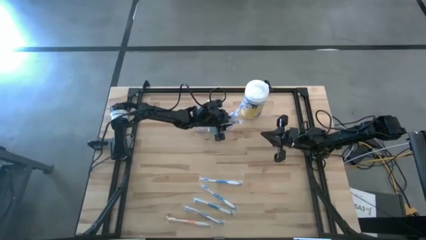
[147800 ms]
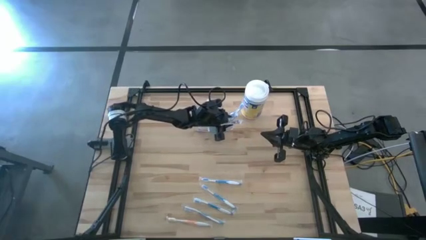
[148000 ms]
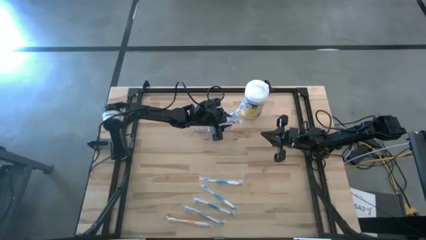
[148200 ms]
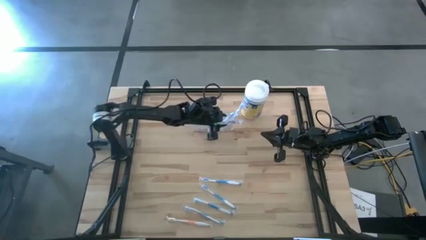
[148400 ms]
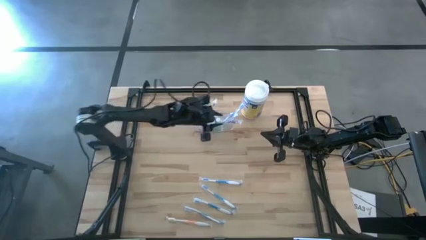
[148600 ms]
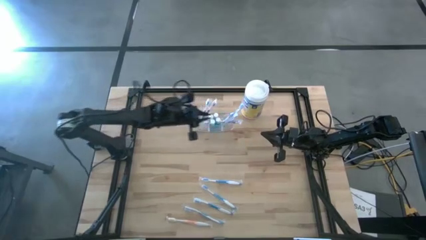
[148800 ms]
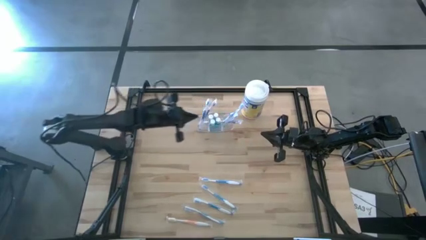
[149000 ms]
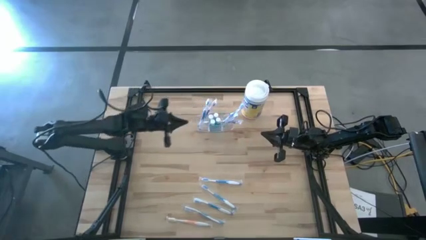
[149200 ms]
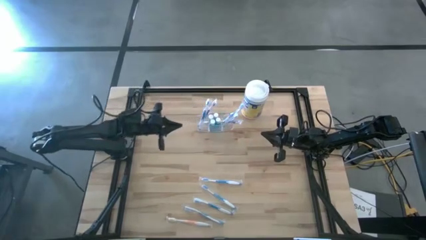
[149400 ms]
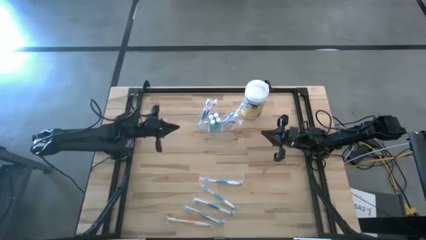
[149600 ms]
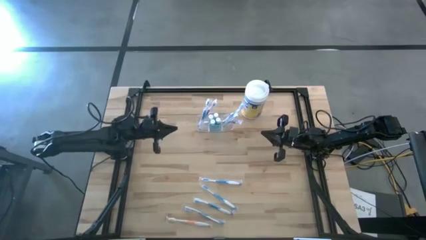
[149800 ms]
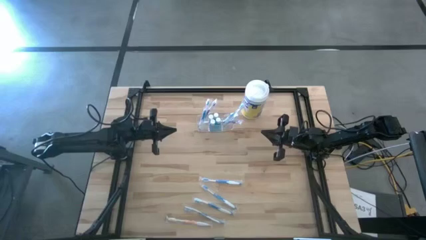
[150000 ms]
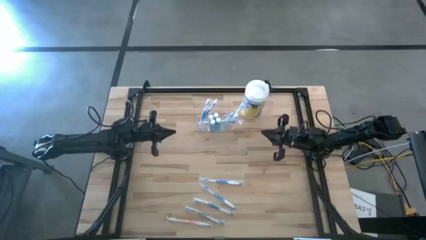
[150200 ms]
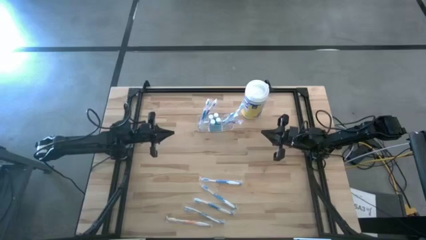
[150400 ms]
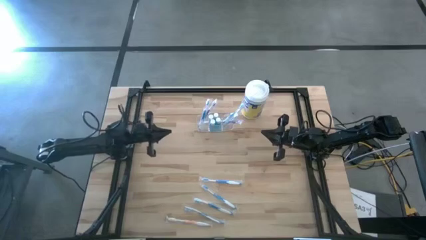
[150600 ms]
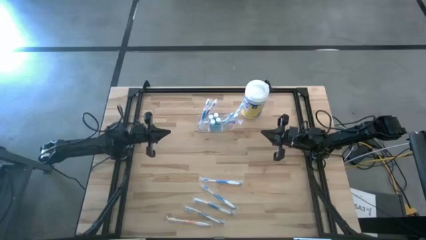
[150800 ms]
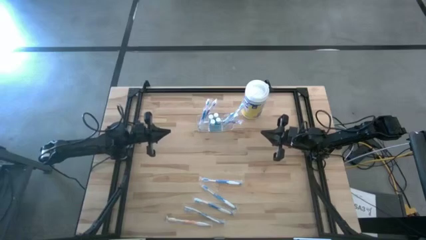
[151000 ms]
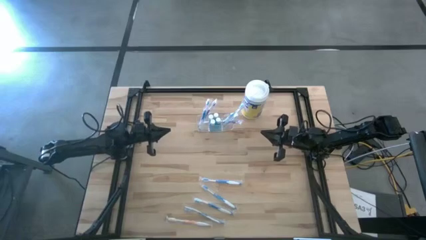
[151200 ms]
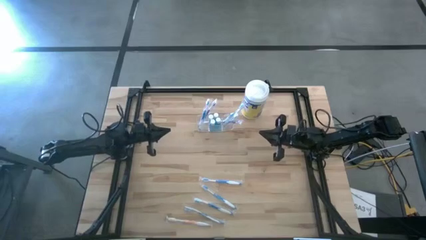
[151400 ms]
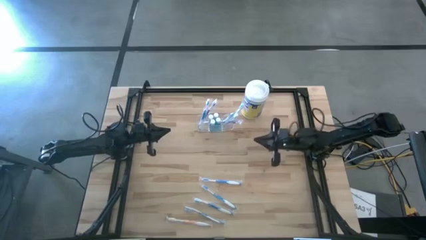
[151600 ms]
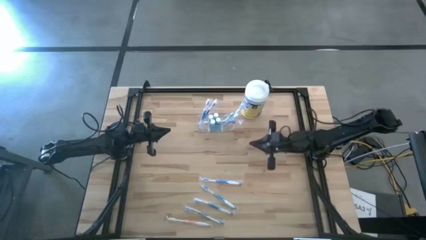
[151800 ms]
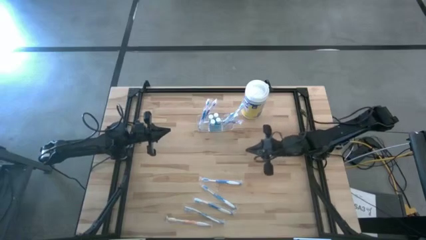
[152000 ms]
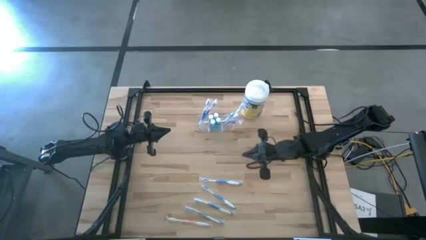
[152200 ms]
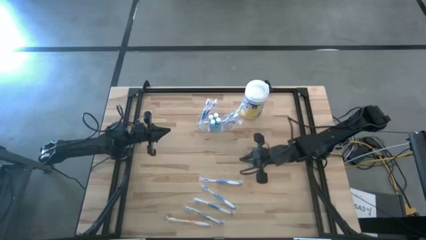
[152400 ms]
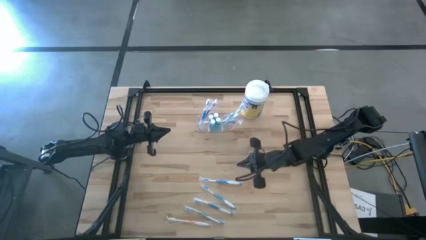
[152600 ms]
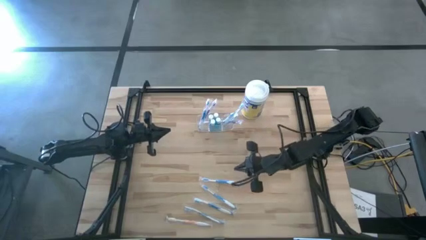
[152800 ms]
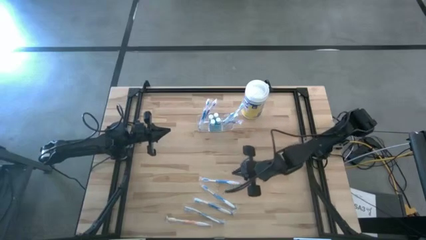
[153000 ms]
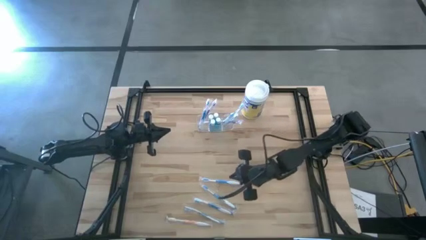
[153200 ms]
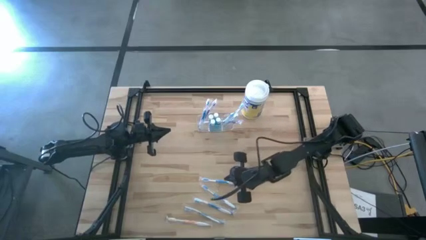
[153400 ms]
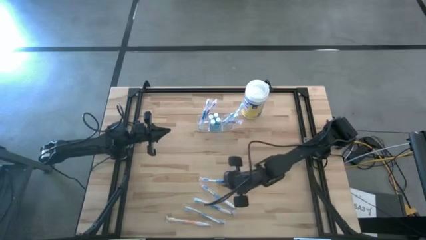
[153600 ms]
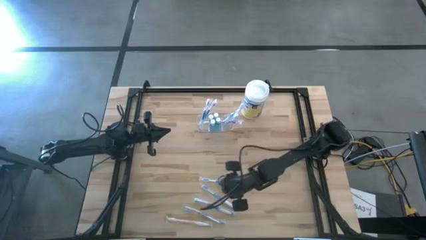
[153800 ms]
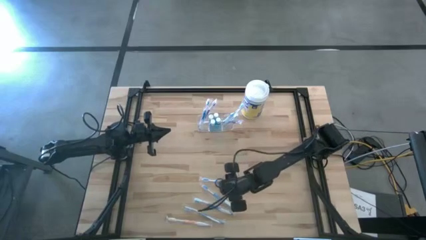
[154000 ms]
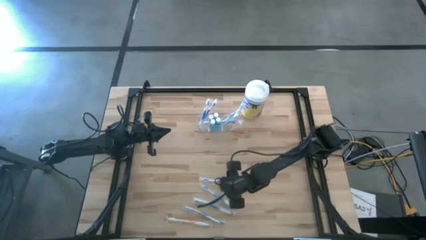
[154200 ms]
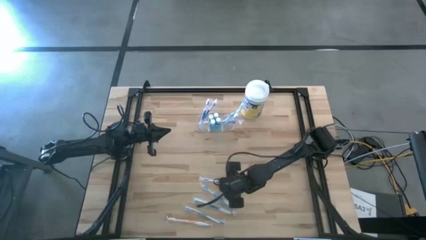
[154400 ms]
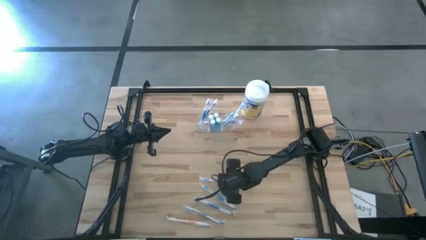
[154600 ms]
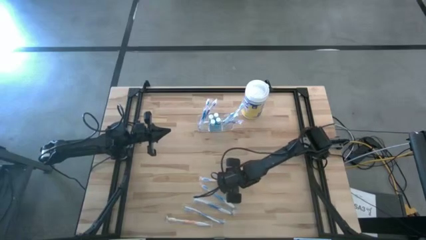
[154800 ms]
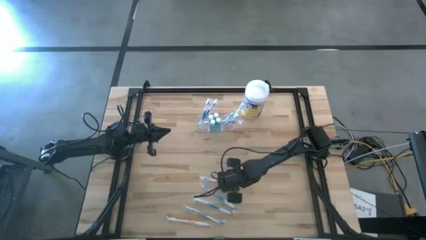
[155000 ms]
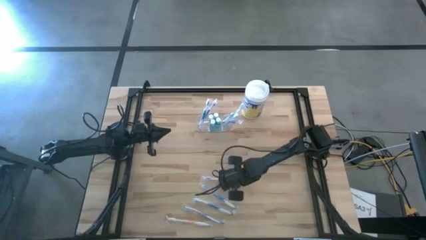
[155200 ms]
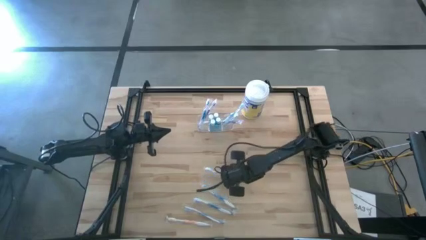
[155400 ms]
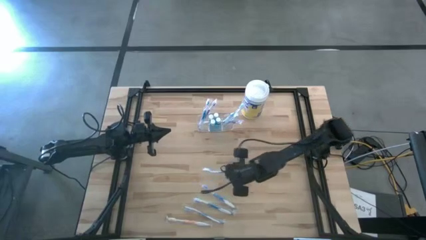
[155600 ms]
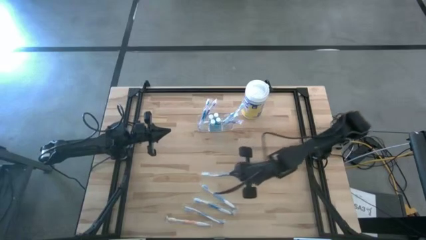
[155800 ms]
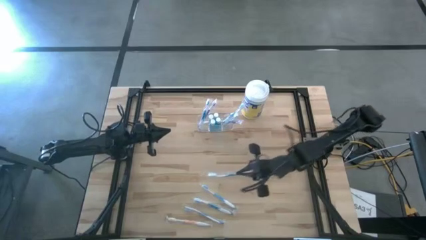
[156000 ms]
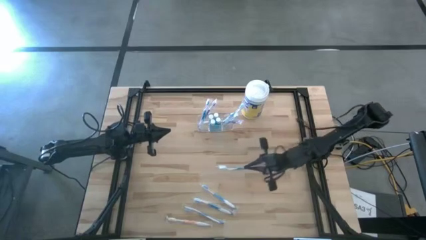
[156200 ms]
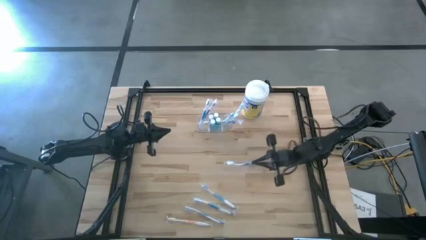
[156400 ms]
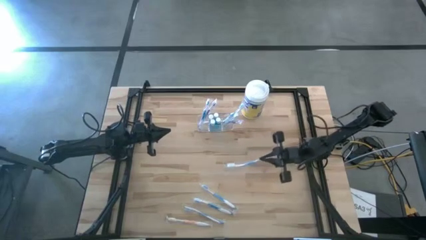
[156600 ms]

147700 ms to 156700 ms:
Task: Pick & Place toothbrushing station
Put the blue toothbrush into the left section of the transparent organizer

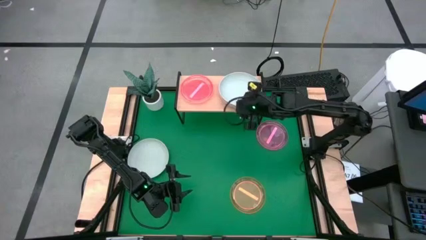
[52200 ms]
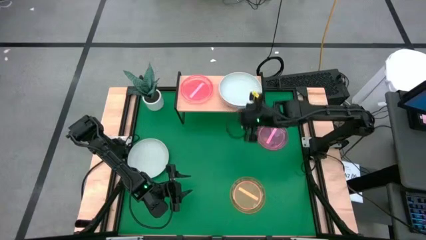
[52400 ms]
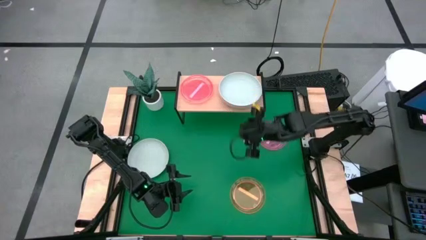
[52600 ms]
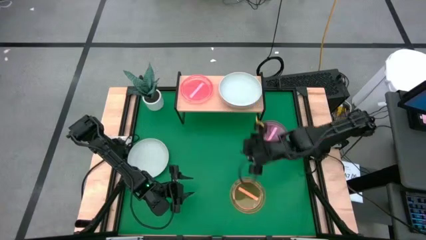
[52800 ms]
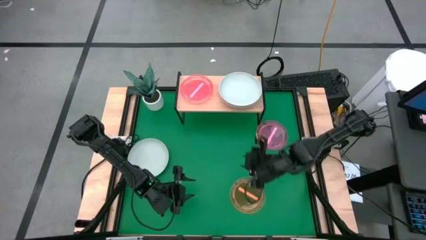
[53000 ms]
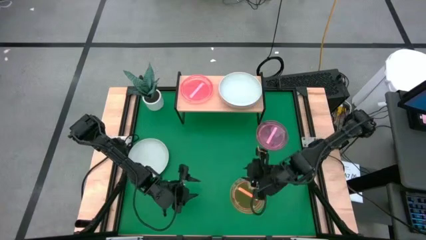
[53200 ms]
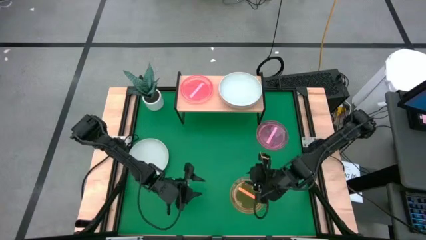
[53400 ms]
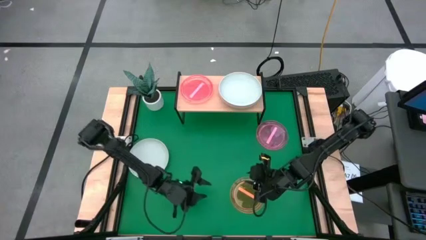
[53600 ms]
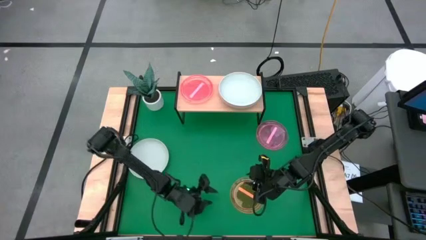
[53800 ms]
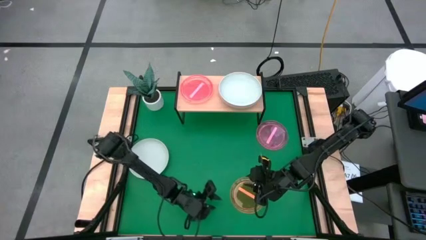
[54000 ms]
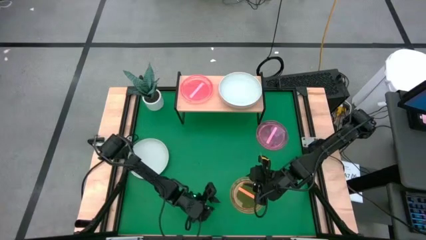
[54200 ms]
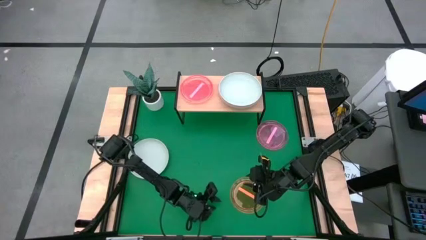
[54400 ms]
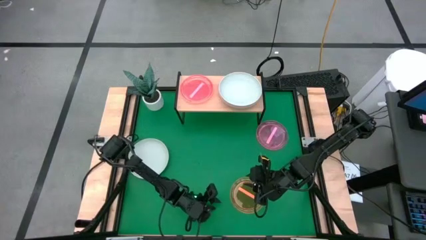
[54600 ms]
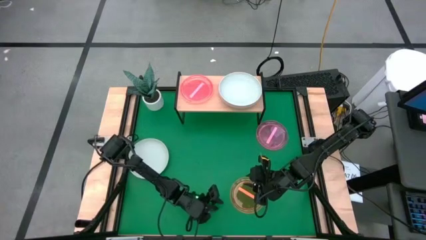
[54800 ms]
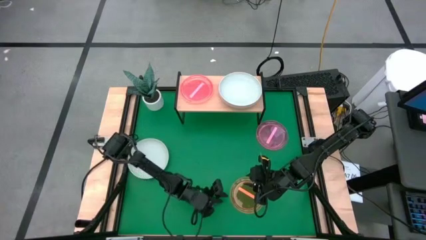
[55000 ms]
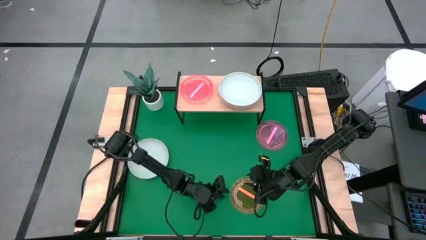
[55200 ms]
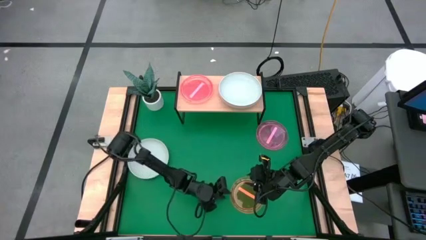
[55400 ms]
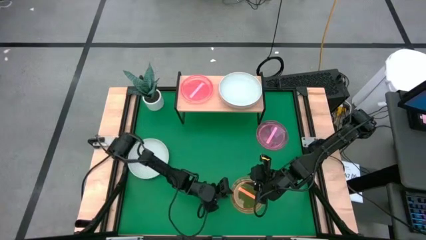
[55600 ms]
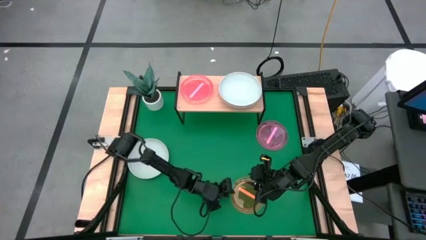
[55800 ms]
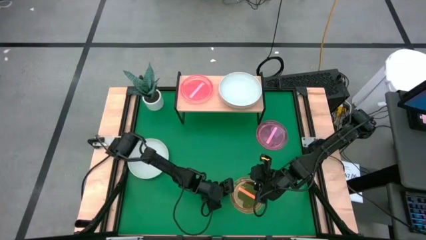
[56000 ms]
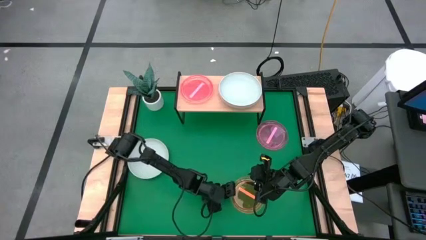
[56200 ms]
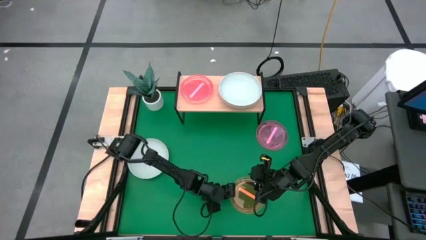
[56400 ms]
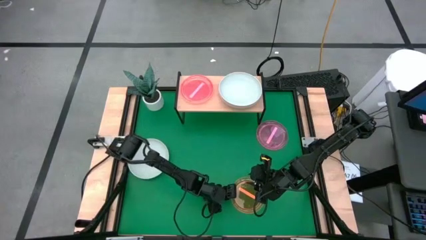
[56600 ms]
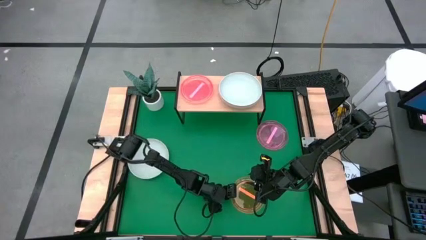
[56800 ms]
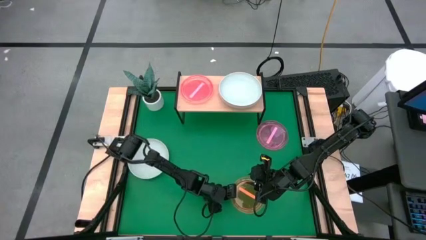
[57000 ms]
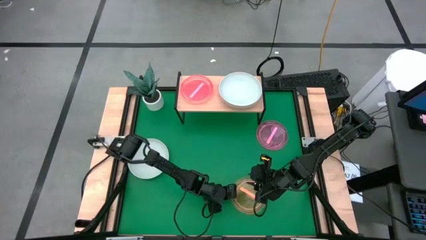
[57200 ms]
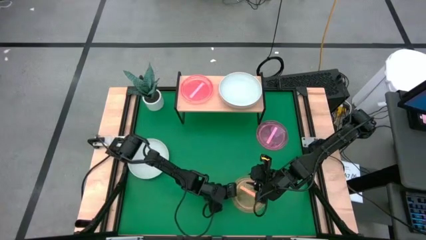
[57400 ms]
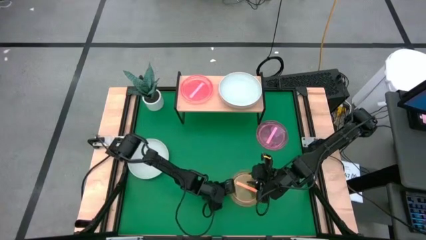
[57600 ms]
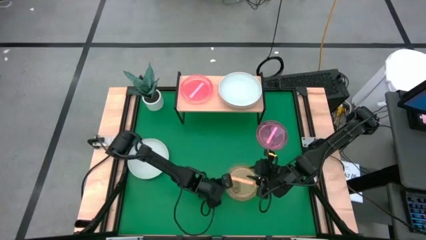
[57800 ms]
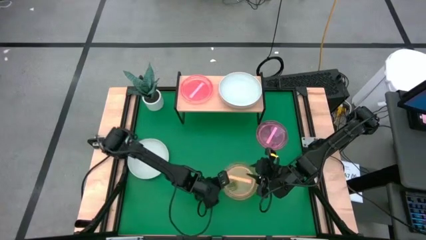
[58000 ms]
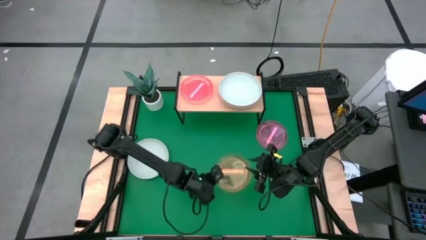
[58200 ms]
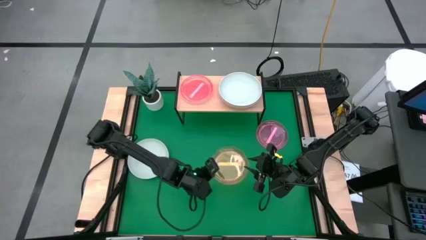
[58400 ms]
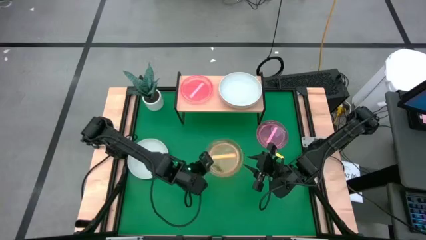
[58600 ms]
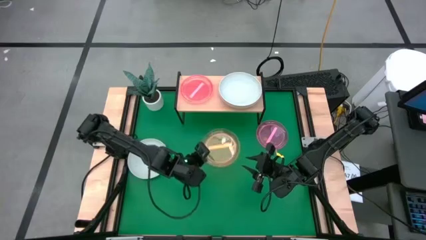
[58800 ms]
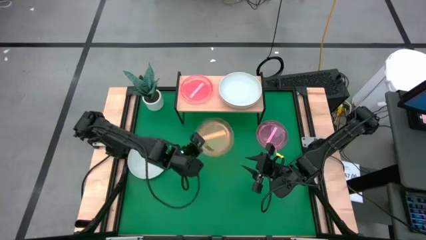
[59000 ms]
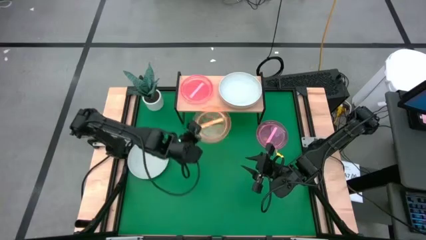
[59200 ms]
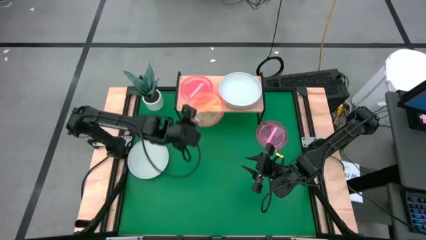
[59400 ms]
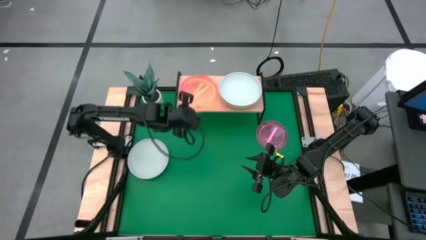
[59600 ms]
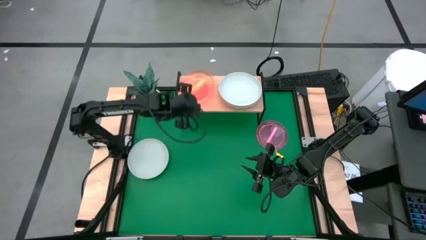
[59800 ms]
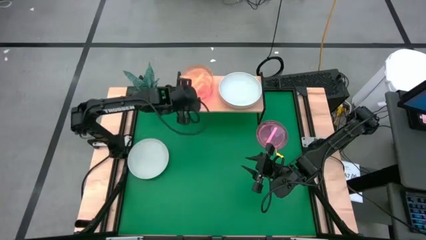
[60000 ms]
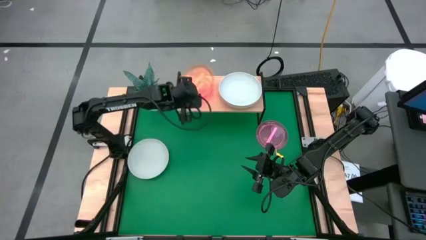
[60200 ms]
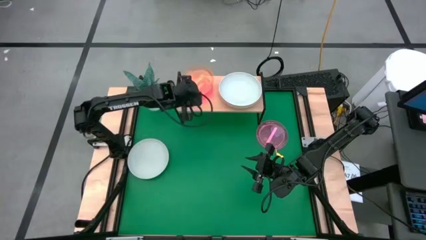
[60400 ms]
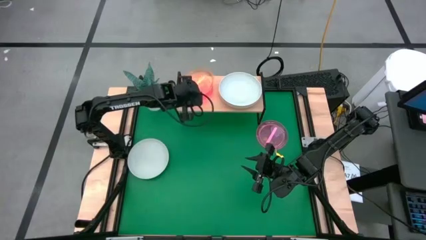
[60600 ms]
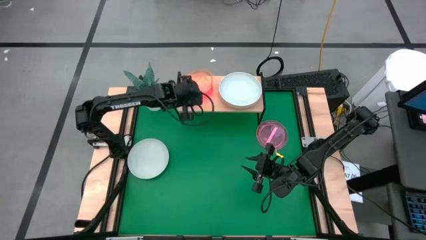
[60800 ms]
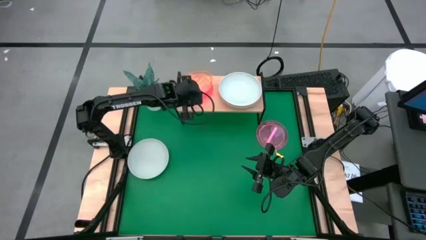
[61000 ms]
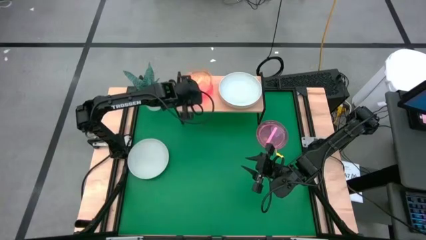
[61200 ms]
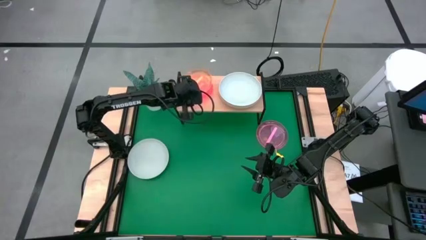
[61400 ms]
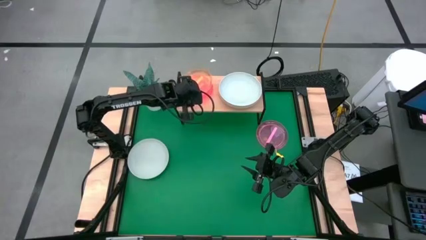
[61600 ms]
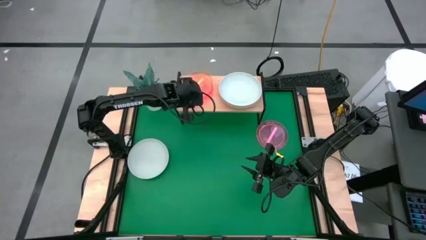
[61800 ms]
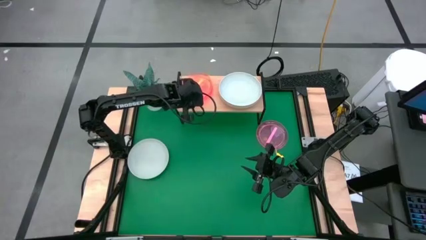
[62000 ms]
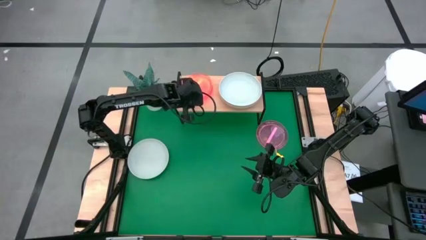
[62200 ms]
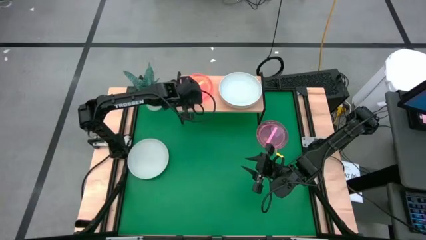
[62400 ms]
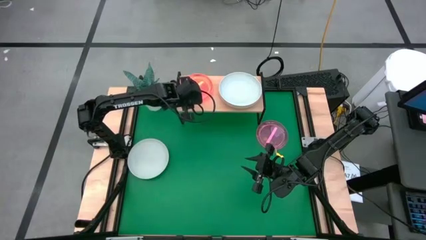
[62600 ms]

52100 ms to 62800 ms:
Task: Place and stack plates onto a shelf
Stack the transparent orange plate on top of the transparent pink plate on the shelf
